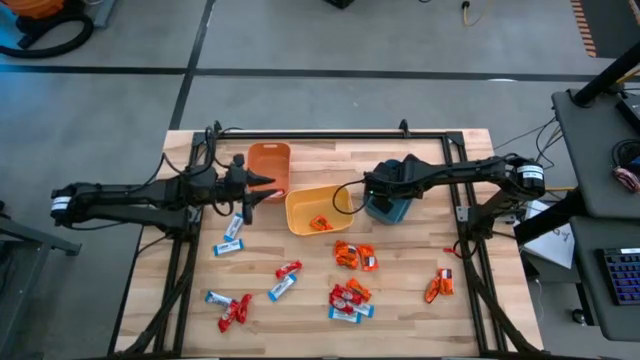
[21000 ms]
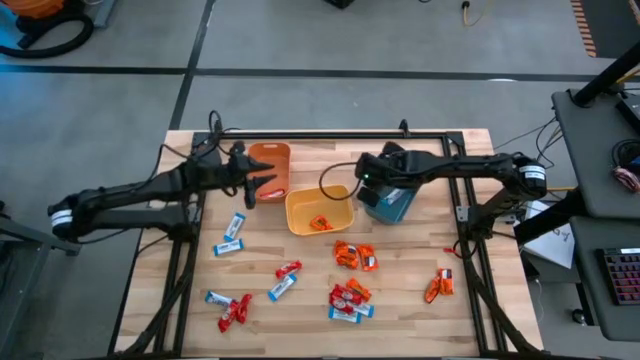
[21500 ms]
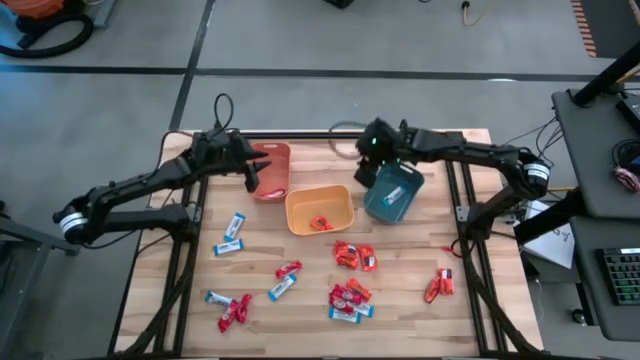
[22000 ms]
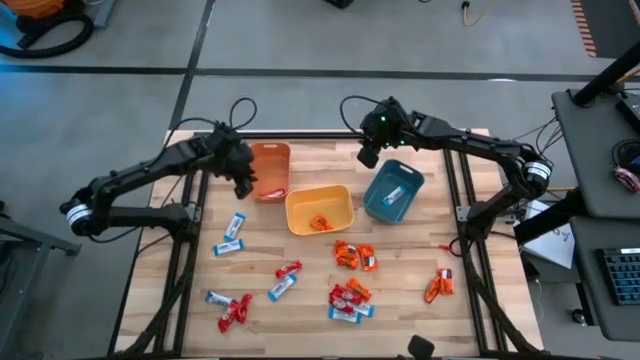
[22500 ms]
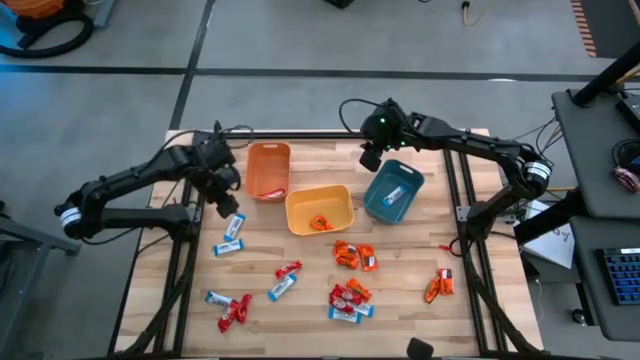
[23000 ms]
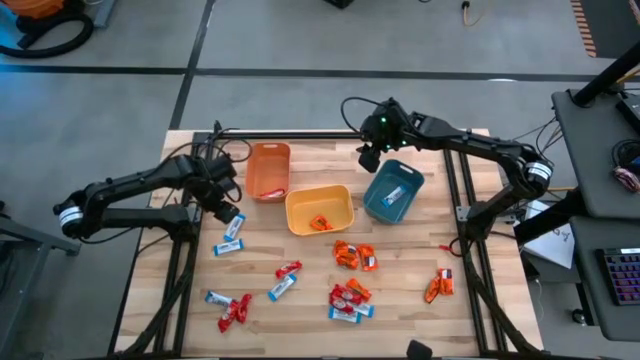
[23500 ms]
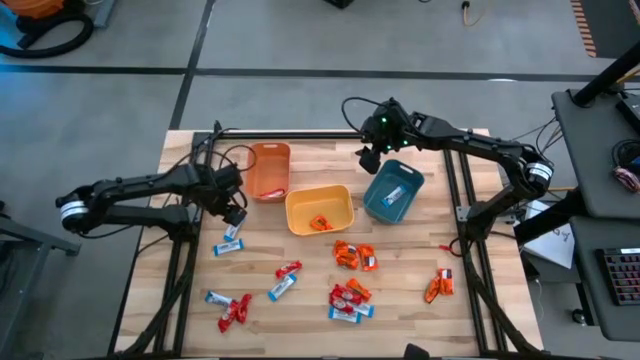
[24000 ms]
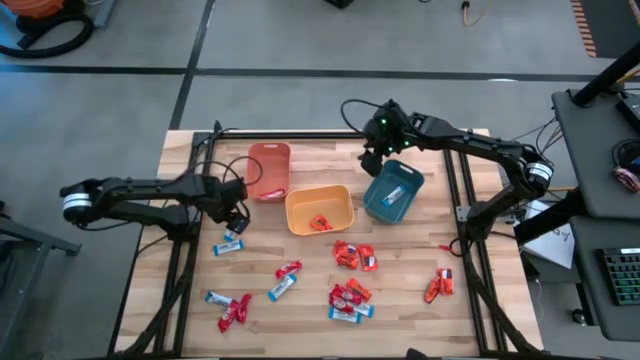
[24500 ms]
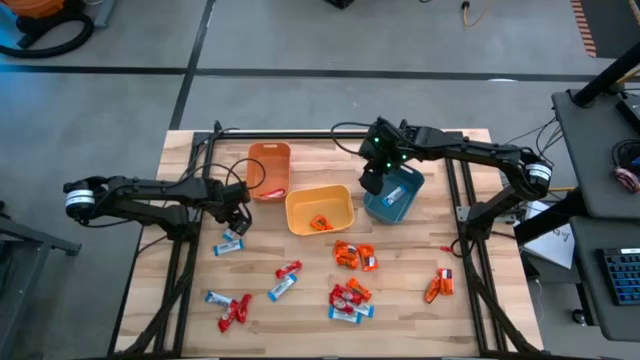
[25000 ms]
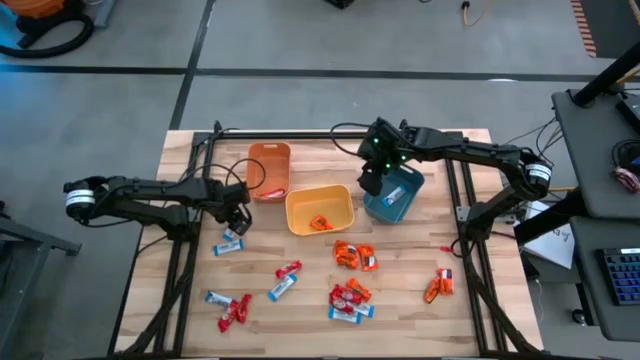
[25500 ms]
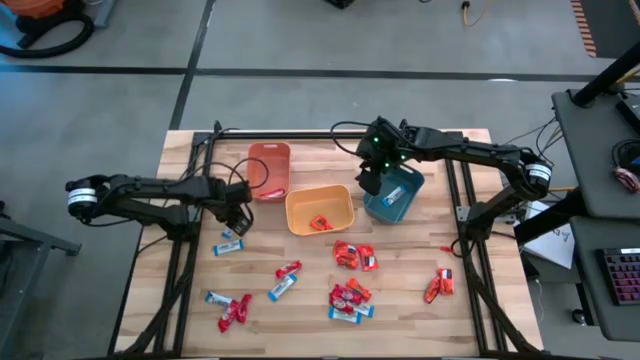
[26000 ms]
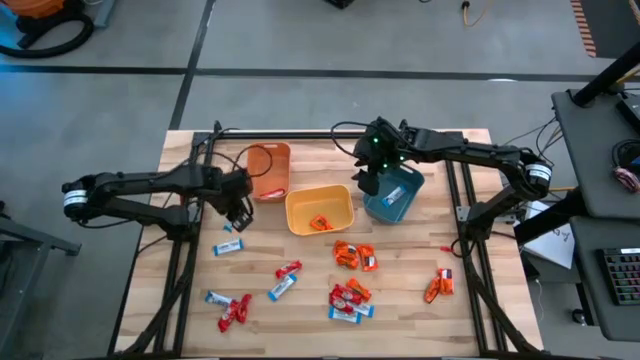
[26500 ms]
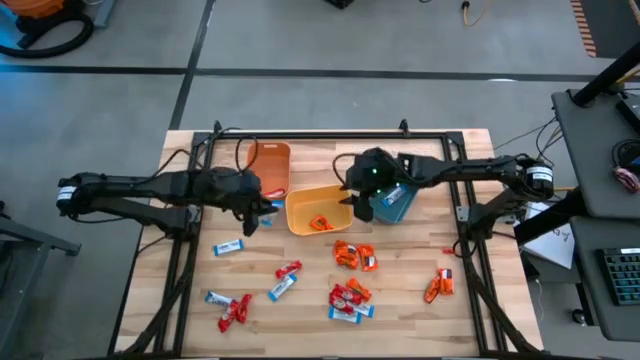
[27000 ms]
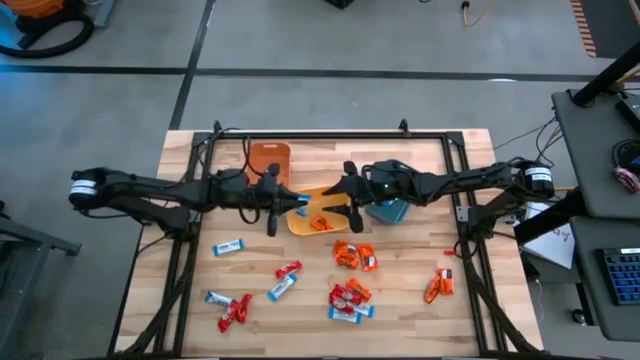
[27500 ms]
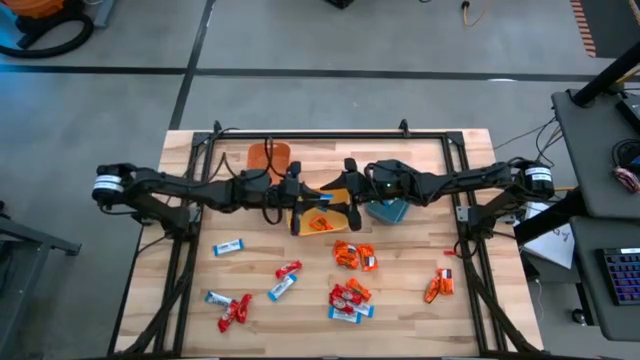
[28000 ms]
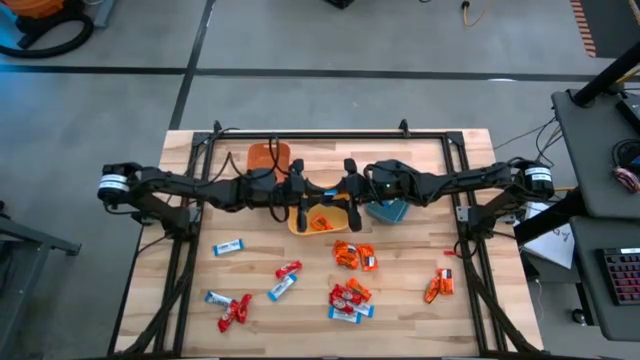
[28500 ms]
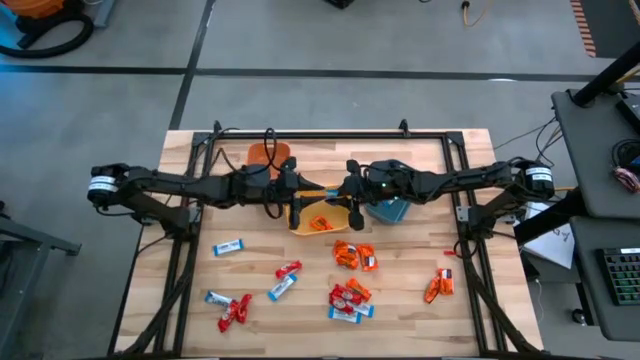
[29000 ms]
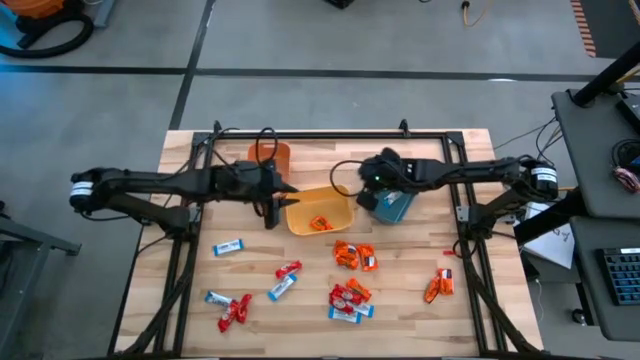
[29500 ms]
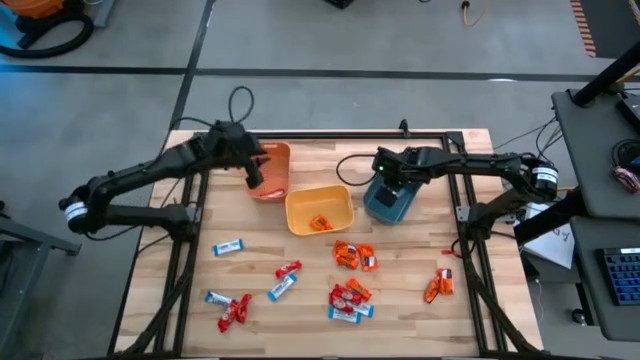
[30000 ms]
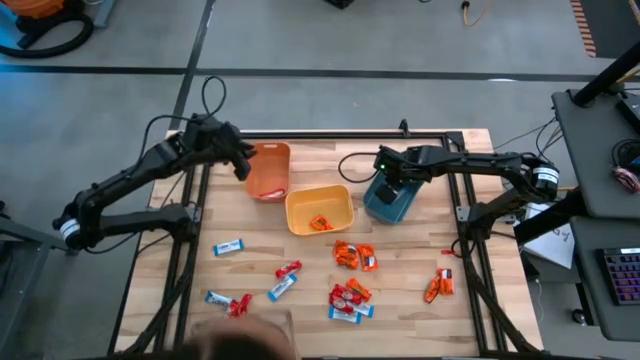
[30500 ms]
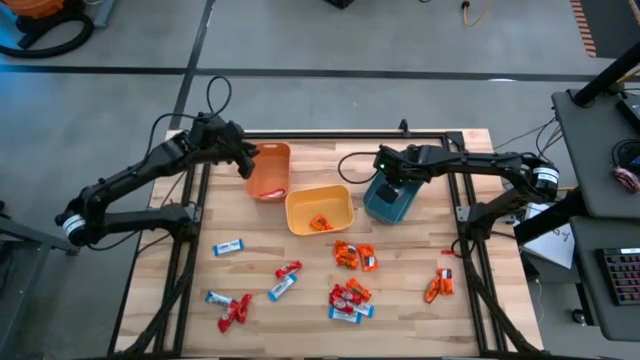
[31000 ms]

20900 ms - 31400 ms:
Task: Sort candy
Put the white chocolate into the blue bin

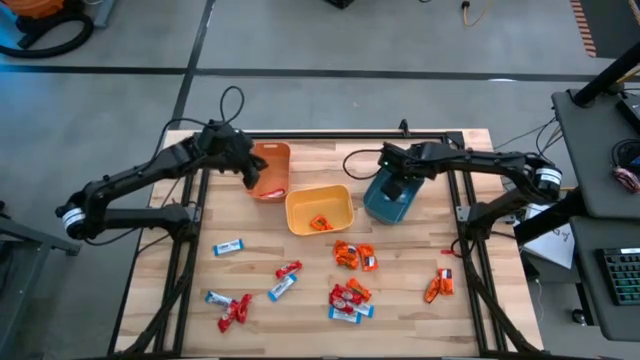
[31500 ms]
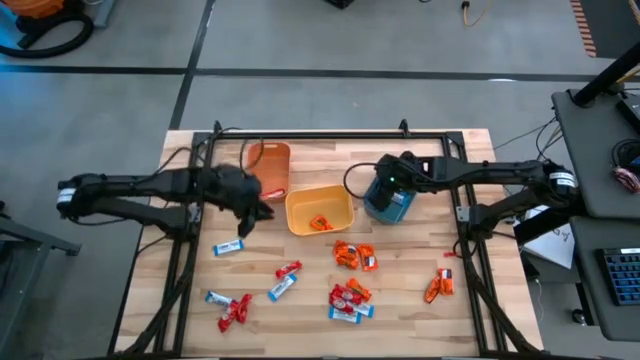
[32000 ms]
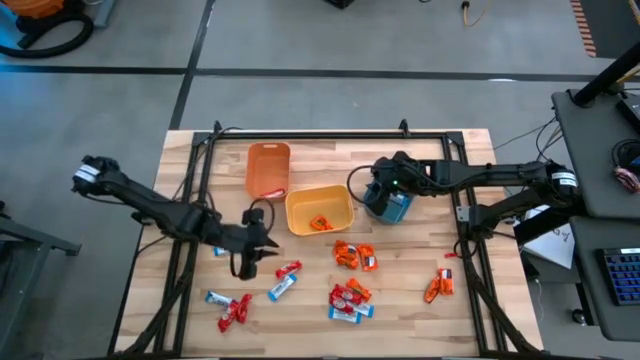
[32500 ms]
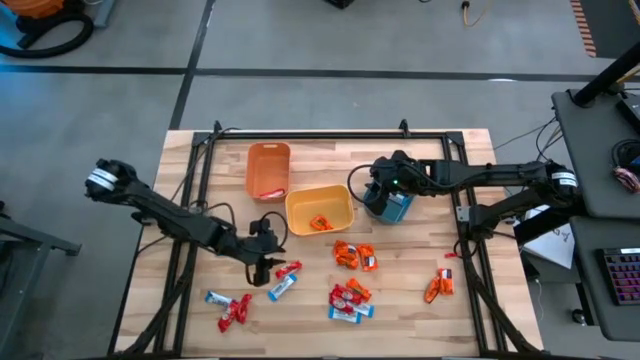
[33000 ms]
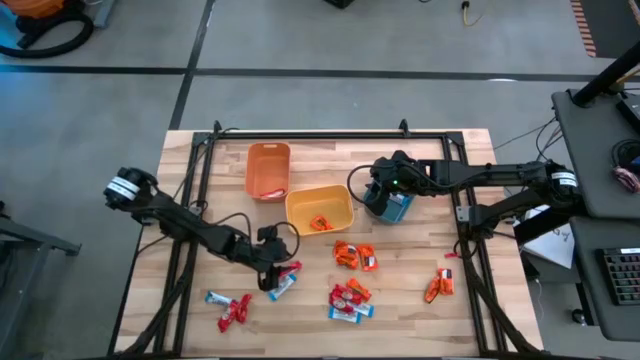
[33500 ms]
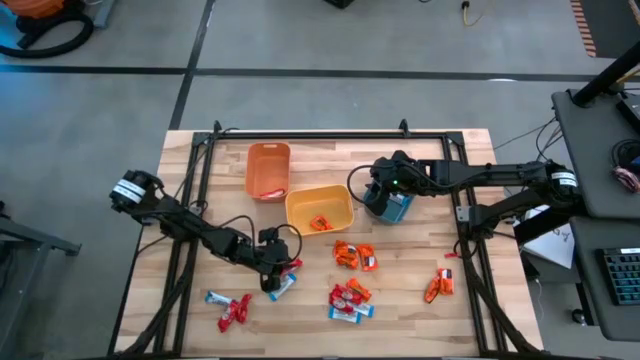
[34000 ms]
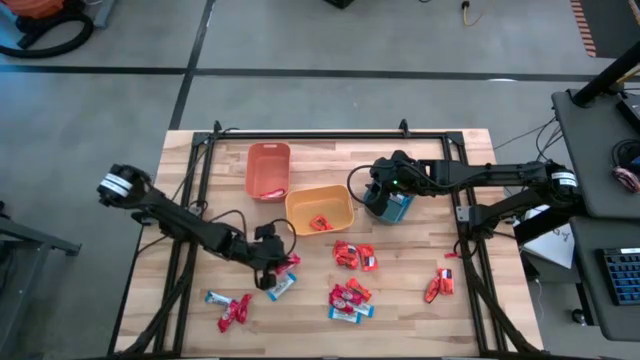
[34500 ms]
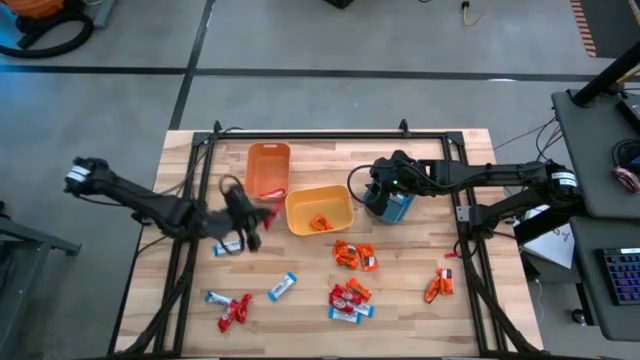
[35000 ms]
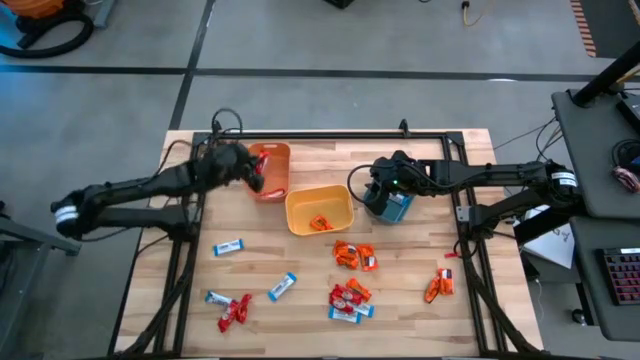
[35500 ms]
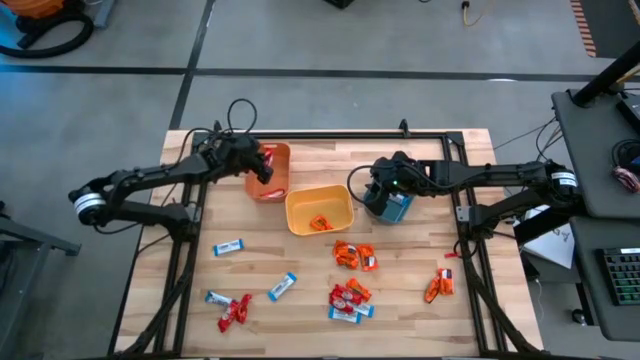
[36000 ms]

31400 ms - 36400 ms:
Put the red chocolate into the orange bin

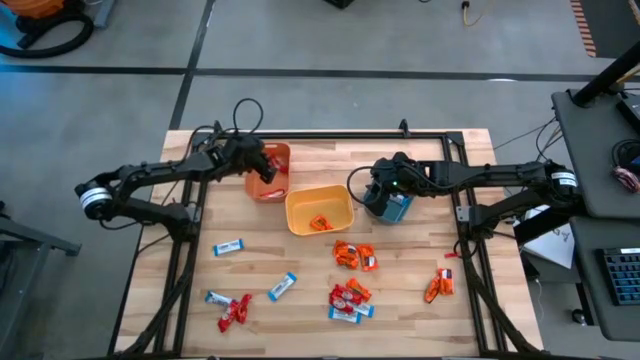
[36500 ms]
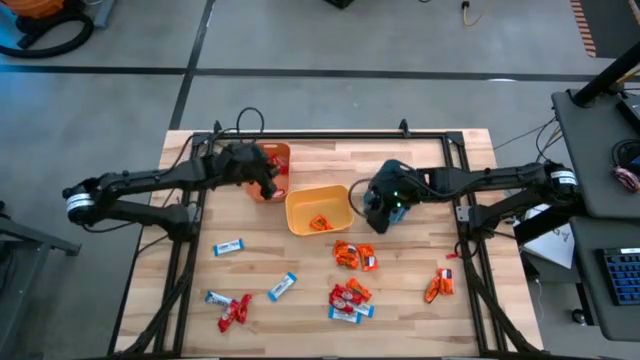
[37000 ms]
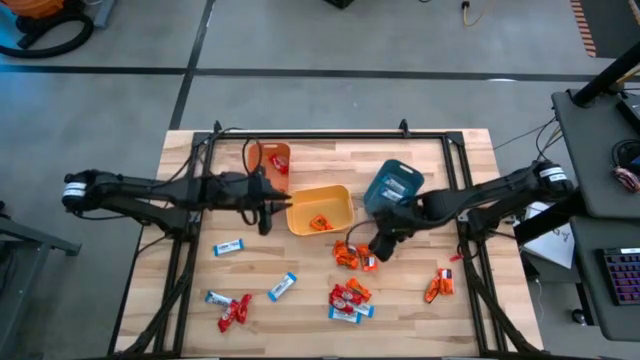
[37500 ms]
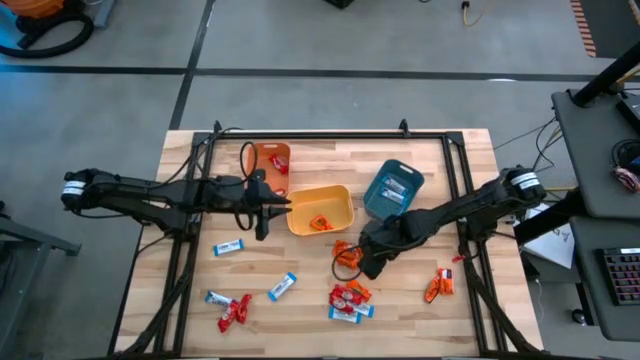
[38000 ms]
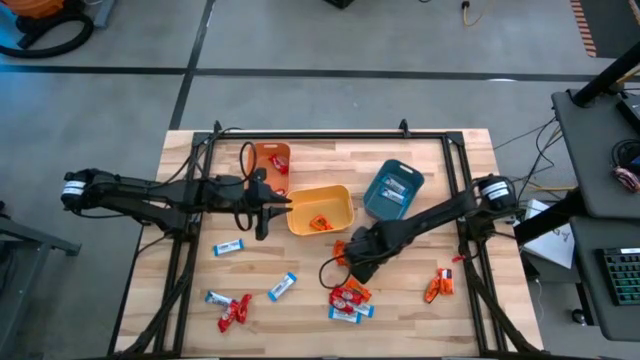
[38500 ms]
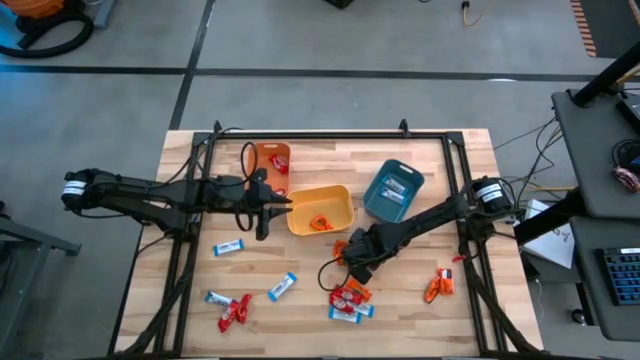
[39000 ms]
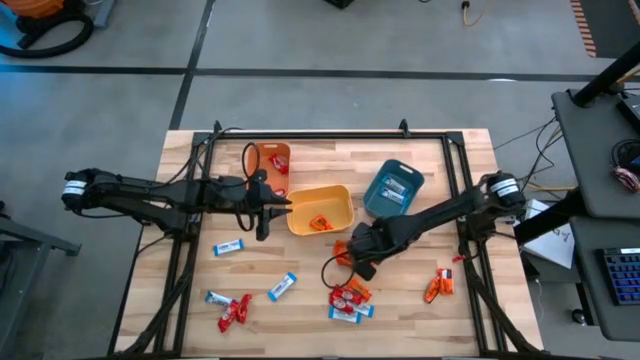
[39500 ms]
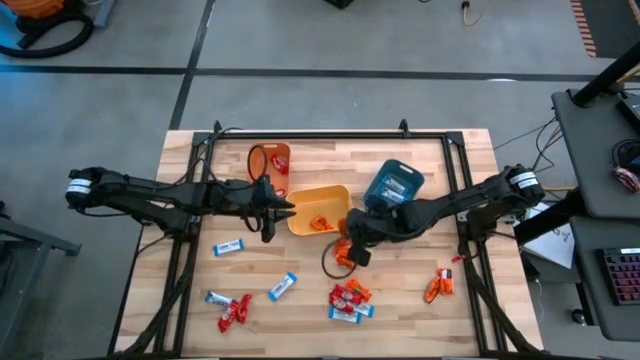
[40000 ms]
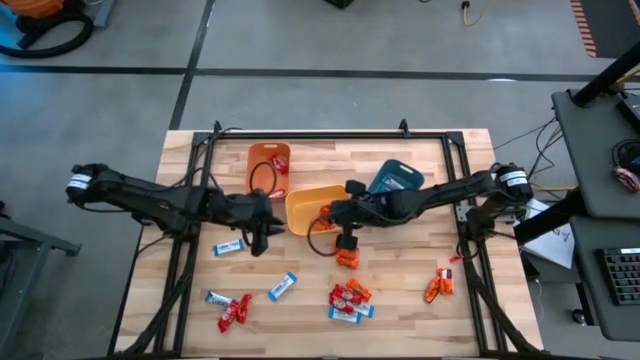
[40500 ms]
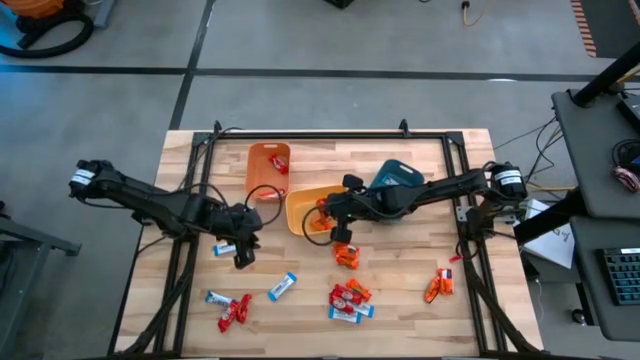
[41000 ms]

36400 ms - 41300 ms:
Put the orange chocolate into the yellow bin
